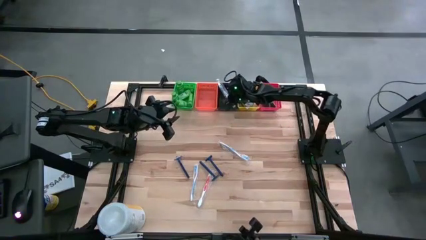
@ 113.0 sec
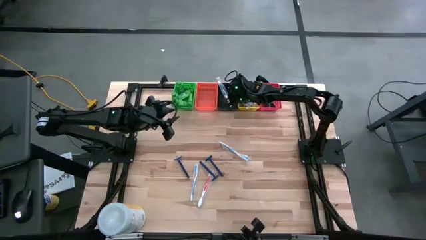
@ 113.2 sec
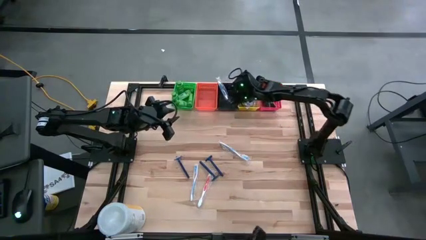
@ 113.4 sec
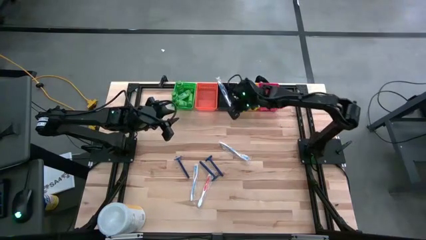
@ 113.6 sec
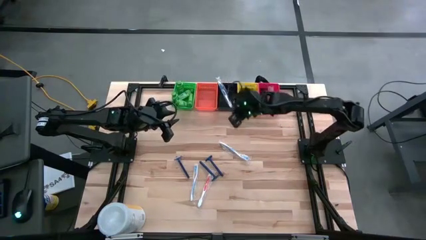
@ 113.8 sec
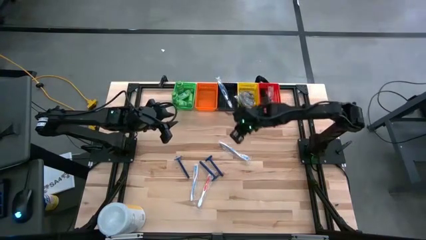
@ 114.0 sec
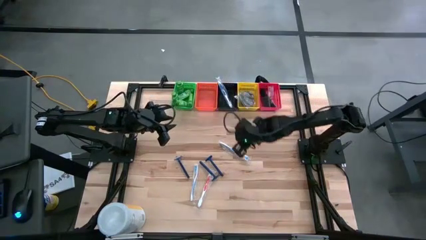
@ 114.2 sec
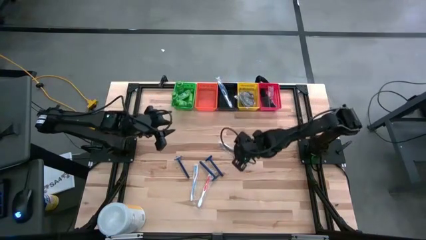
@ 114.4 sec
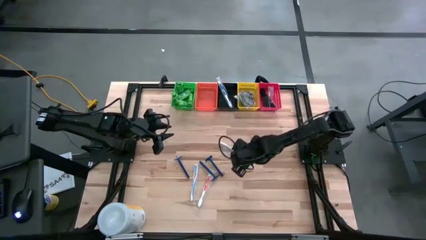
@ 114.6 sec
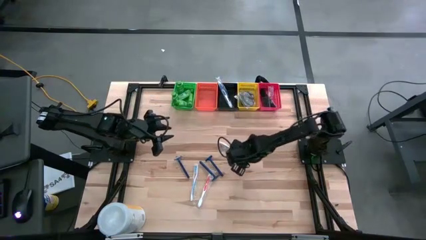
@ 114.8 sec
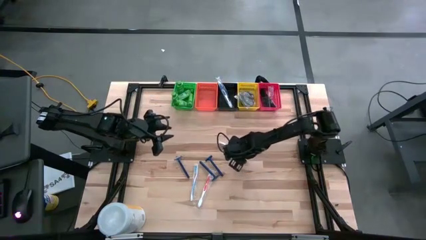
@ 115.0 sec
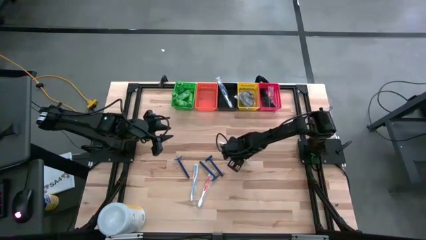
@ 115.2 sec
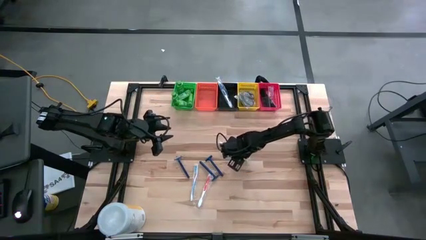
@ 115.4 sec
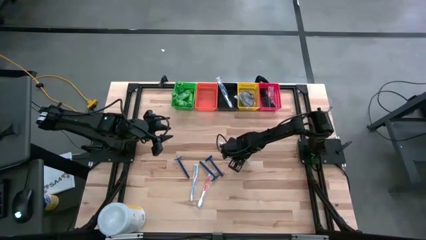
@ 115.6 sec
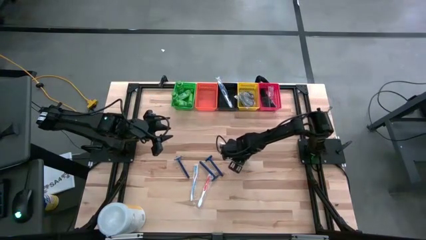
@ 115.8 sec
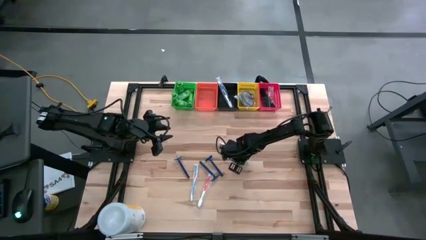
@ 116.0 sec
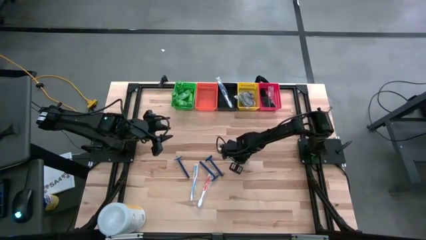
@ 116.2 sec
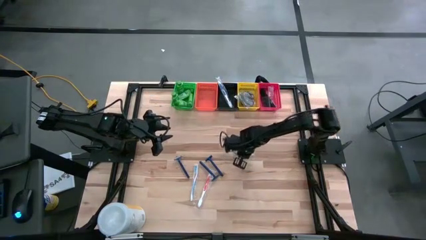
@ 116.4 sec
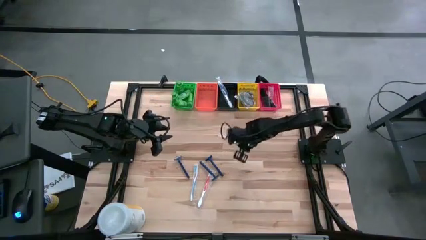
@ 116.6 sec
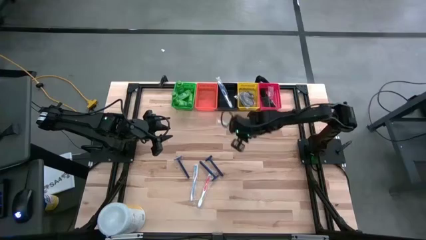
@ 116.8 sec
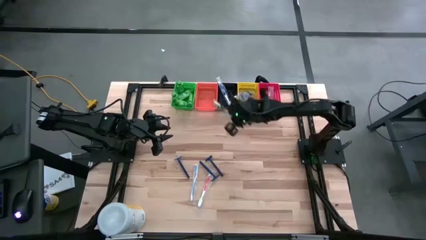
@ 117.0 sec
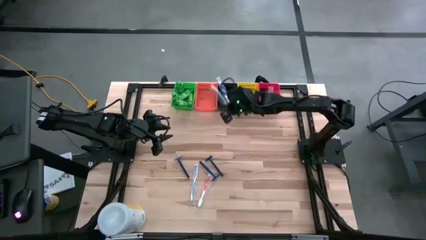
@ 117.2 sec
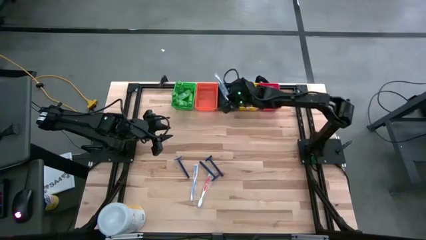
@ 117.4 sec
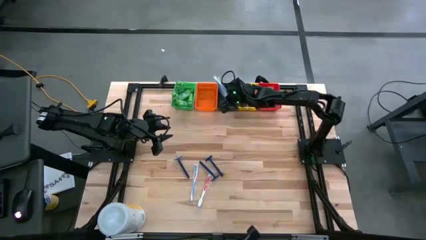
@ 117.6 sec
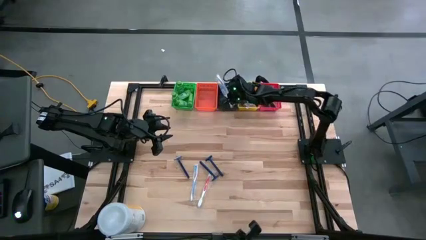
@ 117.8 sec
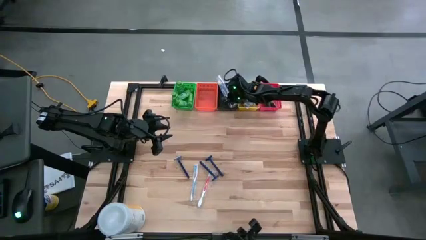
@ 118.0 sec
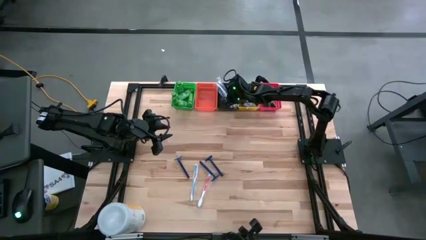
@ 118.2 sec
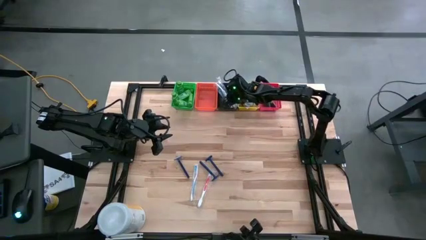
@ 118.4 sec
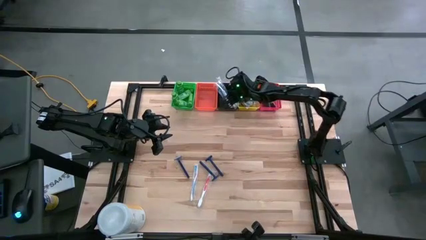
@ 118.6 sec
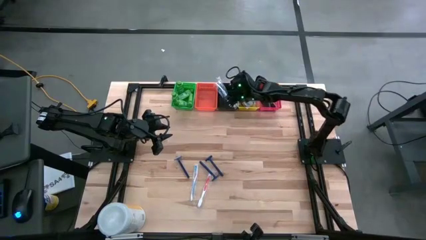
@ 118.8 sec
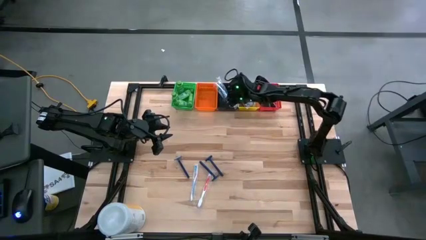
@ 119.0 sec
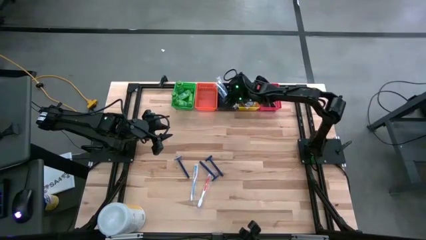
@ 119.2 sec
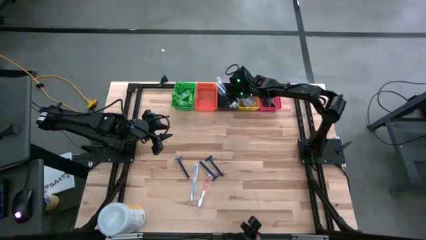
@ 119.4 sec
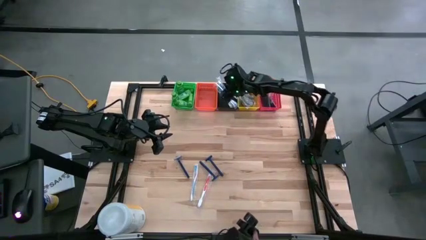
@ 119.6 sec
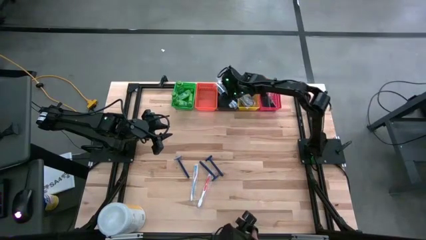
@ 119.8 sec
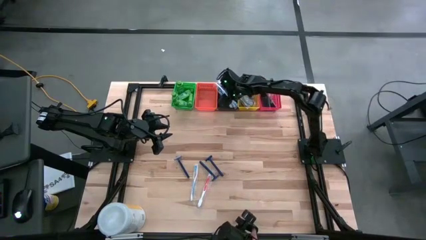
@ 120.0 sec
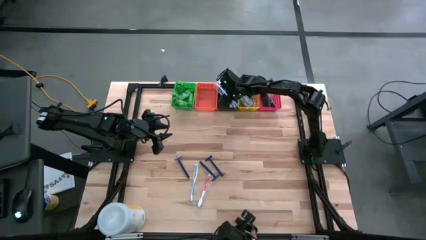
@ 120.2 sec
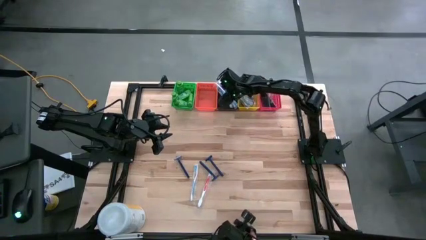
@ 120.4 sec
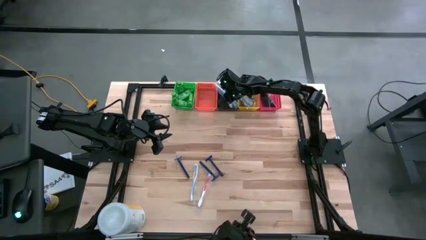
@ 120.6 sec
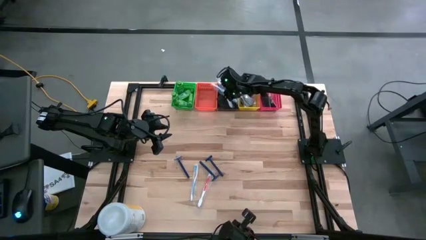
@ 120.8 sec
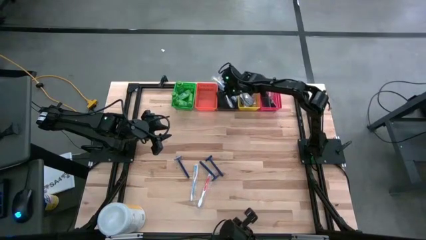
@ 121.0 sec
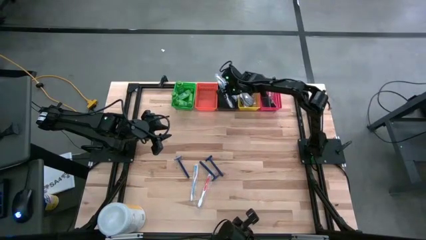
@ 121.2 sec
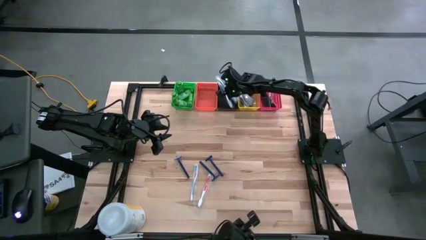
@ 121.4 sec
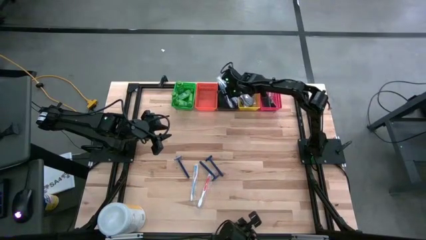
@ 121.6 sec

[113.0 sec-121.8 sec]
Task: Pick & Place Travel size toiletries
Put the light blue toothbrush into the black bin

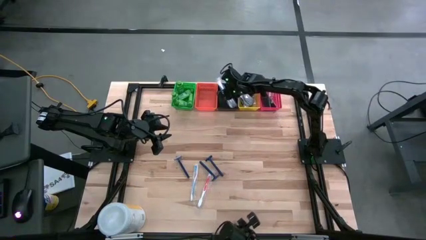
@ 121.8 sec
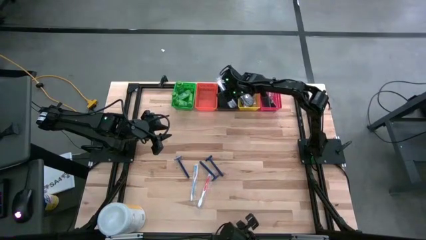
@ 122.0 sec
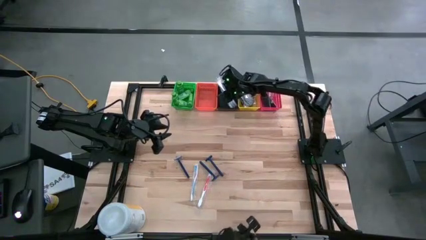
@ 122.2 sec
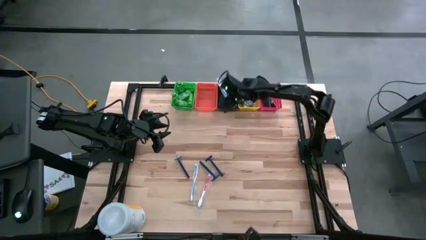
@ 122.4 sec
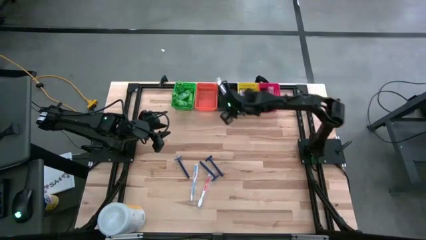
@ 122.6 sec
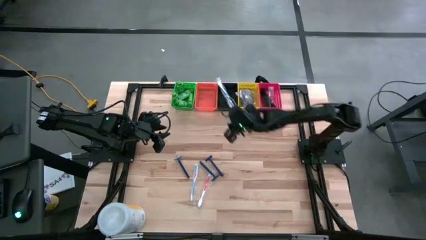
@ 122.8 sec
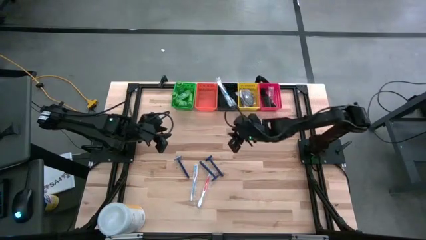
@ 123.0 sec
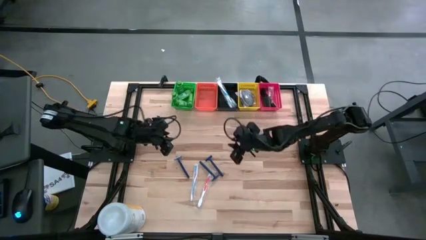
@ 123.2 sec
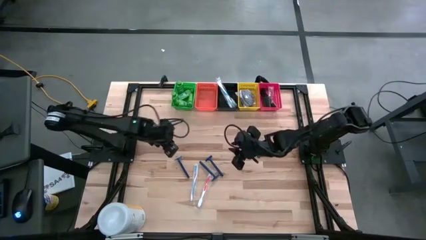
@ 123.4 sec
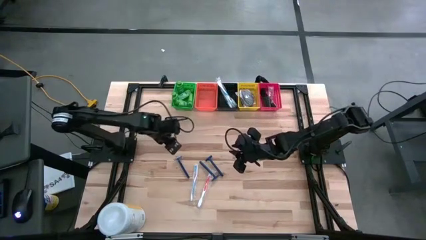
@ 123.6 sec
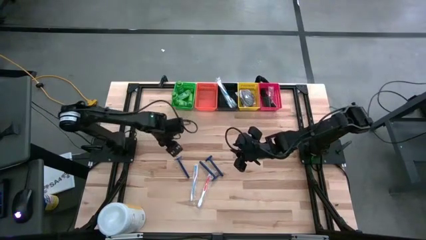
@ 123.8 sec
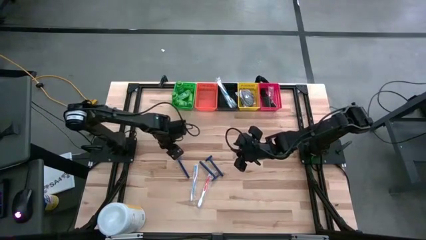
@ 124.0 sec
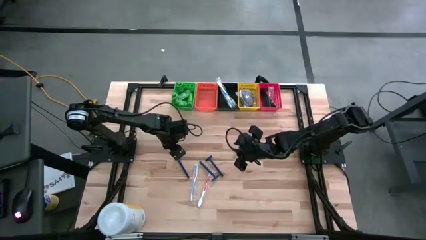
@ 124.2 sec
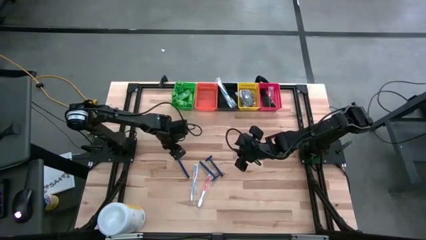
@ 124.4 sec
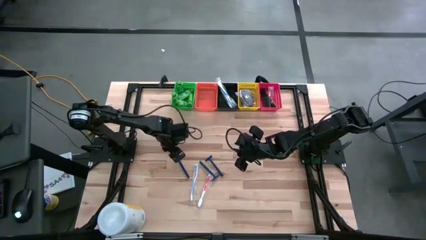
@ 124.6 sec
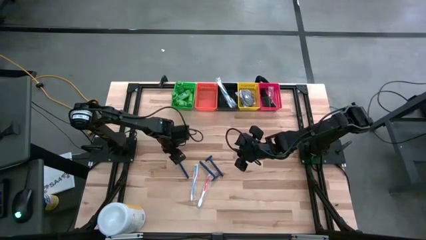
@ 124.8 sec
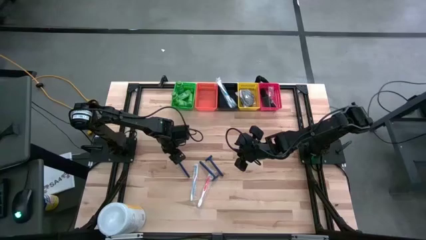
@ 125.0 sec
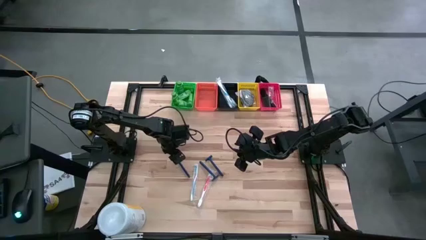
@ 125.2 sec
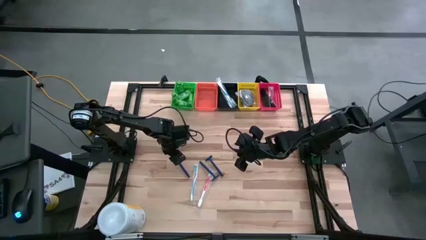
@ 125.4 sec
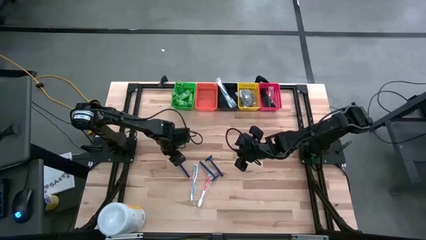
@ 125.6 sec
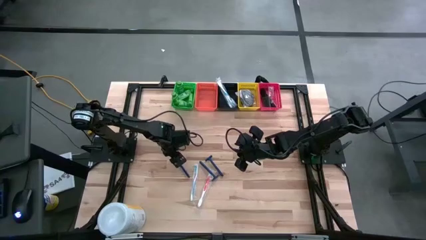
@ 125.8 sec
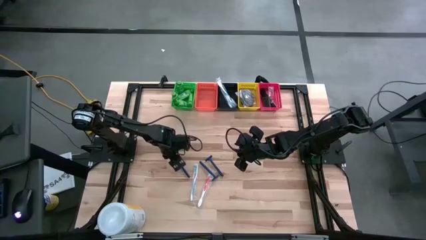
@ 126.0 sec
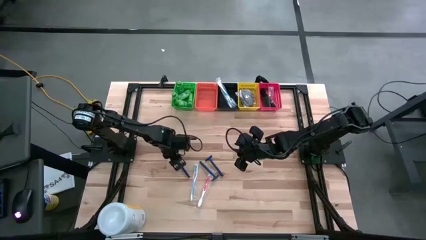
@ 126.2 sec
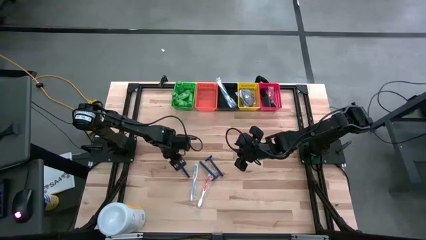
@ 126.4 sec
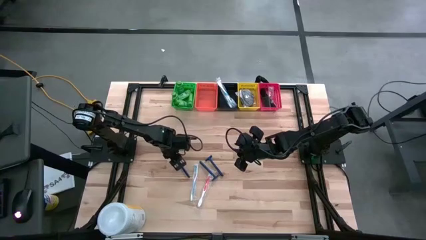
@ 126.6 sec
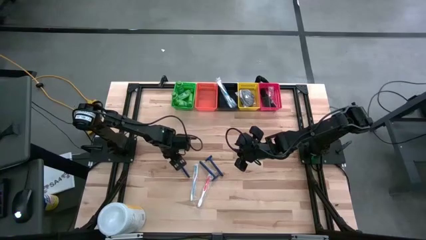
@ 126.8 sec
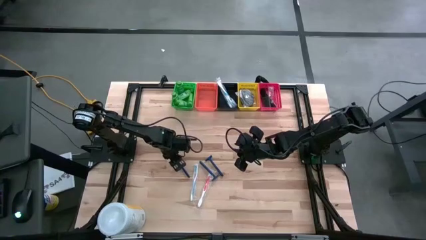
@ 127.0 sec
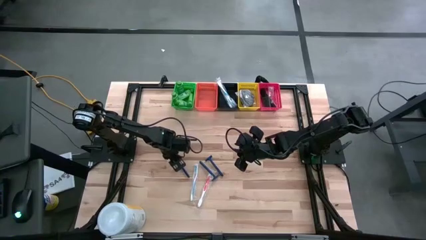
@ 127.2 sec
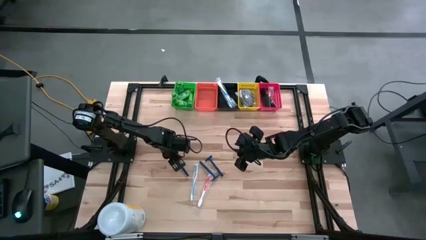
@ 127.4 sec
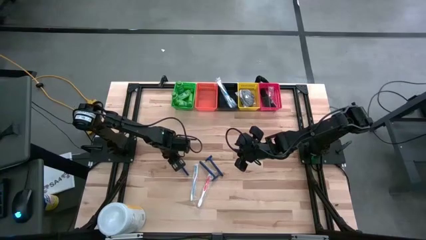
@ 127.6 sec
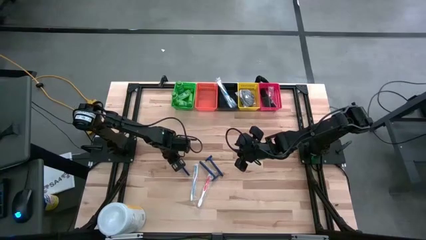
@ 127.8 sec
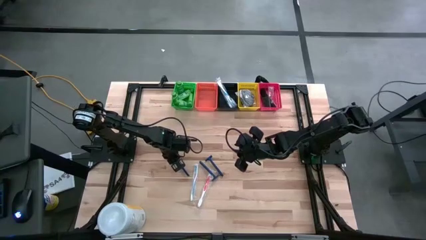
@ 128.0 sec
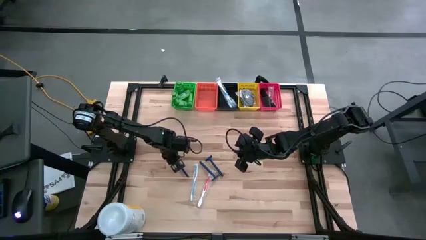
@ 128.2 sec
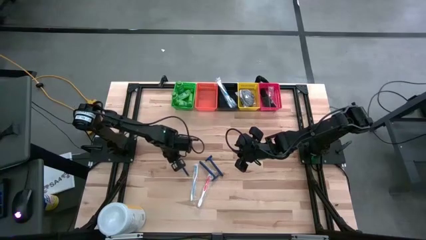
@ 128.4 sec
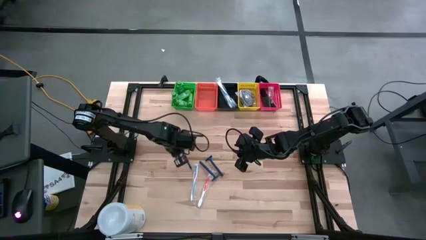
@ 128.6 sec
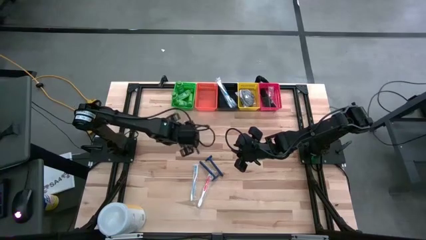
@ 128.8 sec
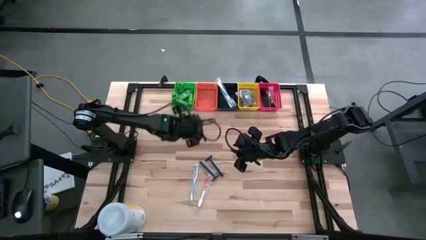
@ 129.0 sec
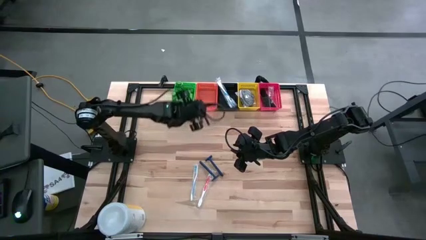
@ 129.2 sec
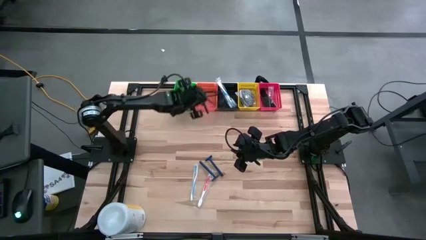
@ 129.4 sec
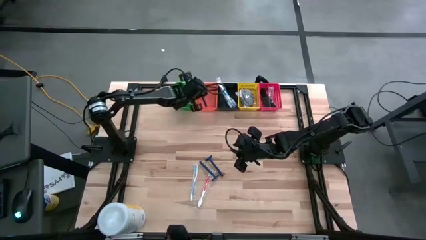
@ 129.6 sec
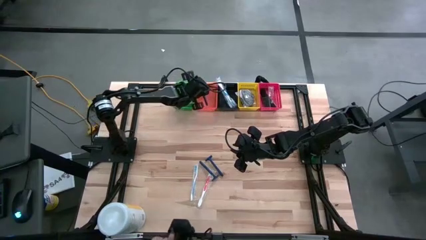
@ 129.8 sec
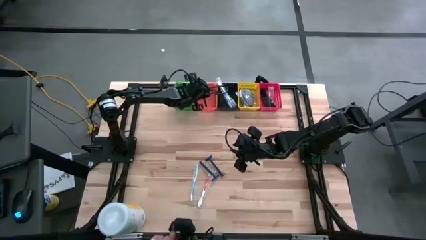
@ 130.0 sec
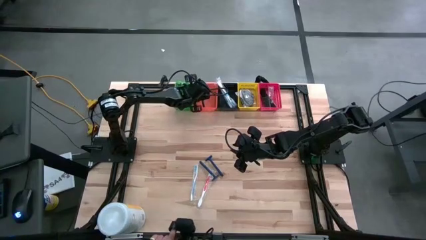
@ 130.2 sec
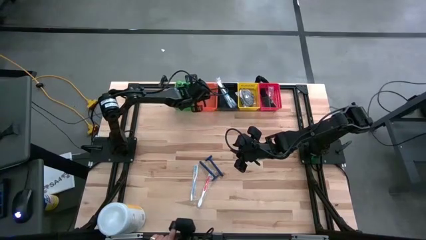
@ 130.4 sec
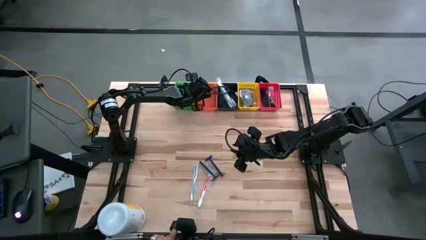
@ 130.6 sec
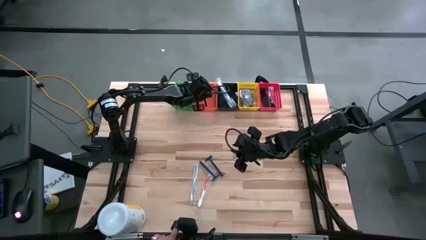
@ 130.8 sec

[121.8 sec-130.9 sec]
Put the left blue razor into the orange bin
